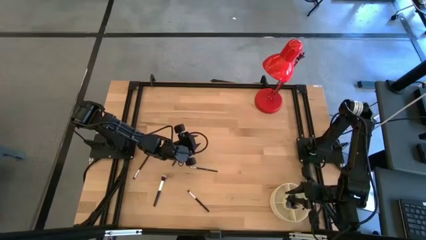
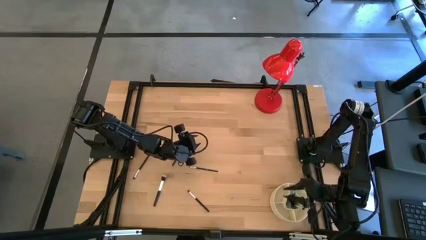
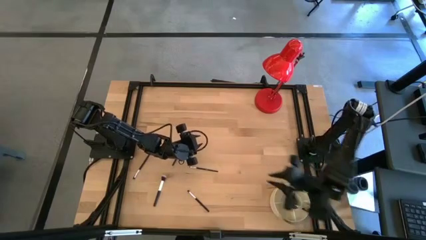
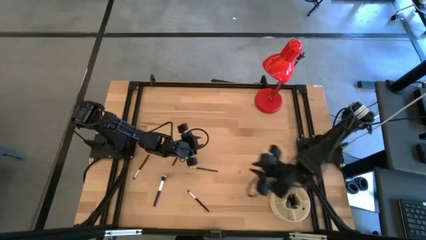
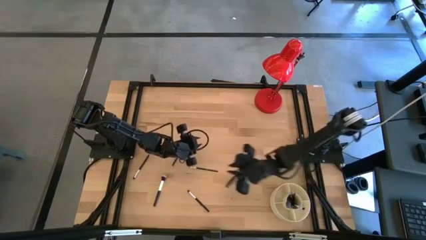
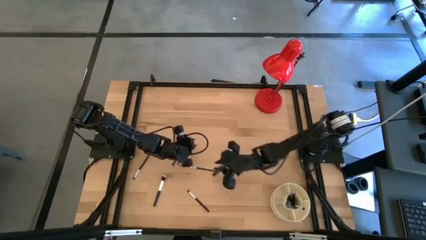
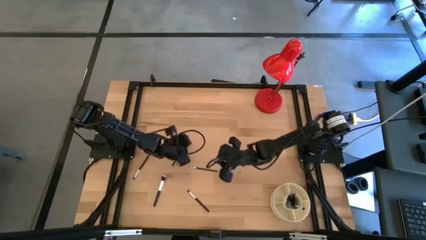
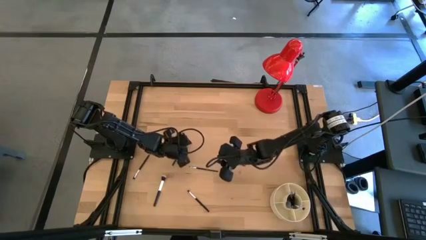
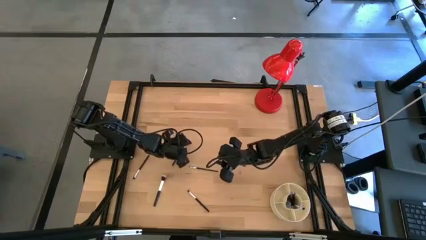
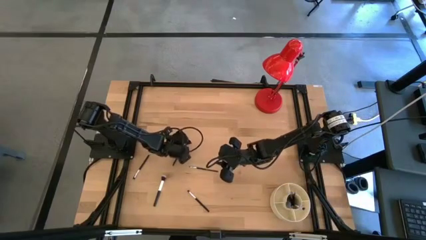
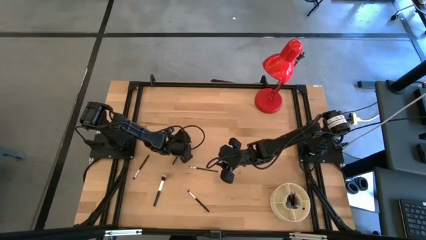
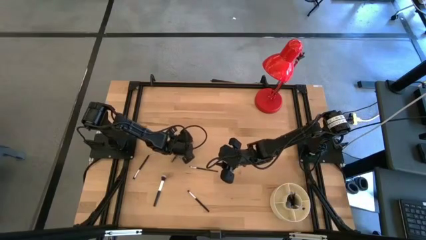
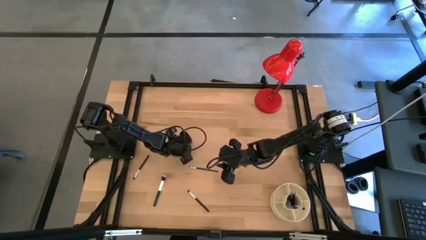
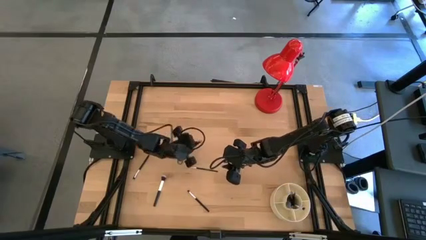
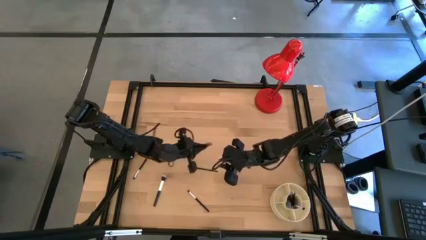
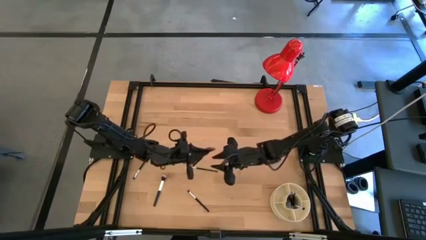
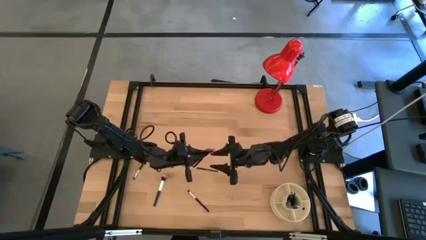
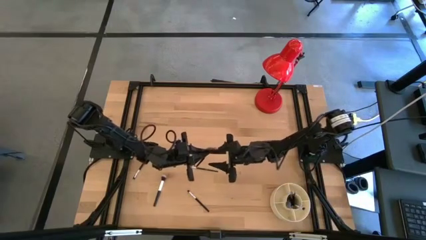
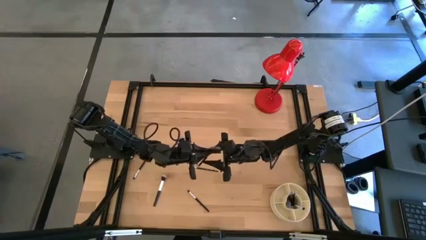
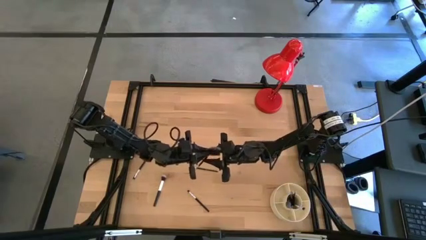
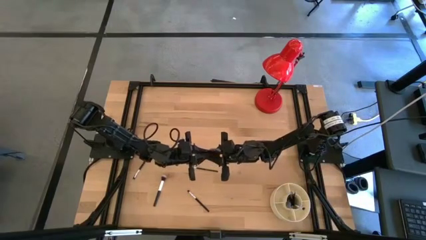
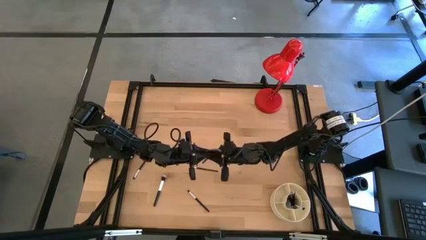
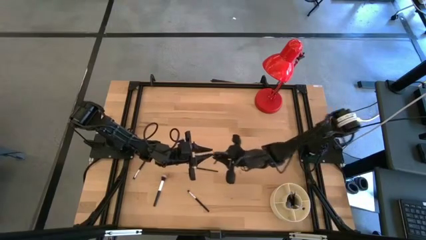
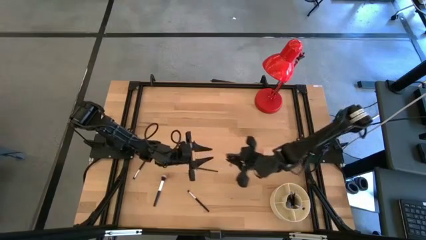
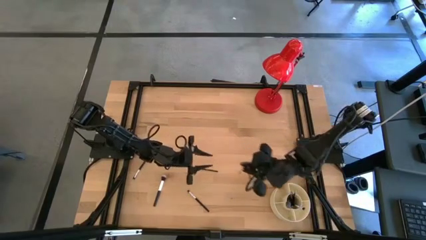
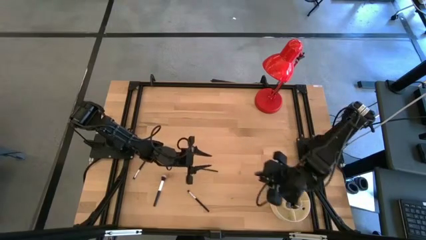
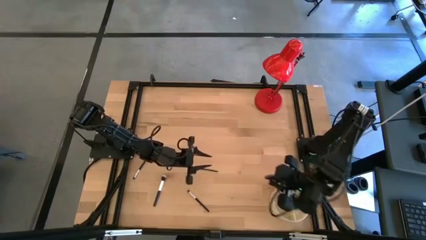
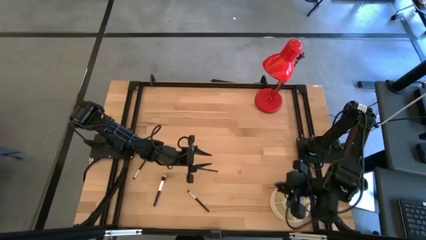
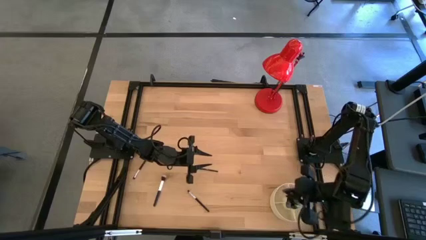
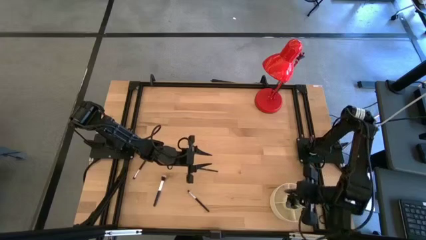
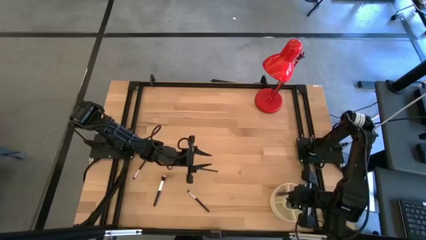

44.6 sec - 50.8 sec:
Task: Put items in baskets/containers
Put the black highlighter brush into the yellow pen organizer

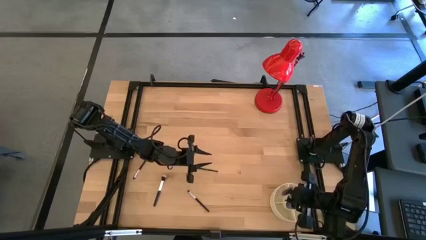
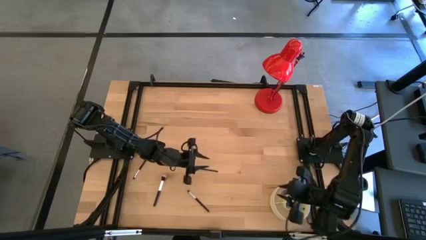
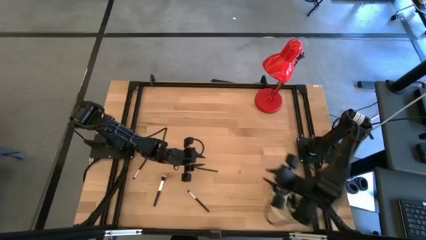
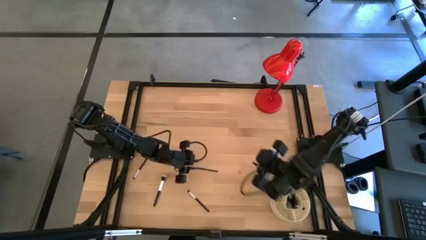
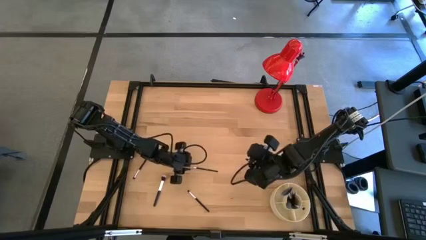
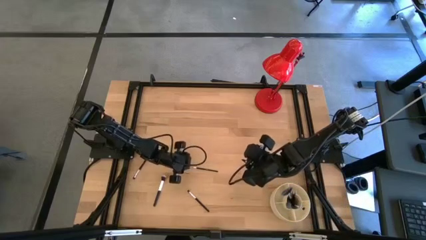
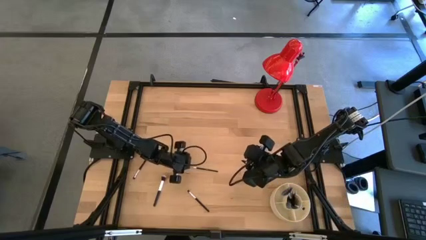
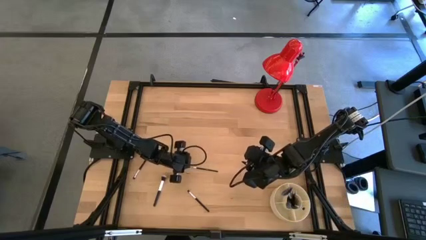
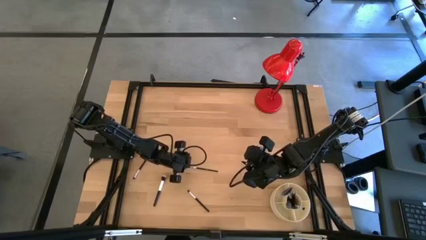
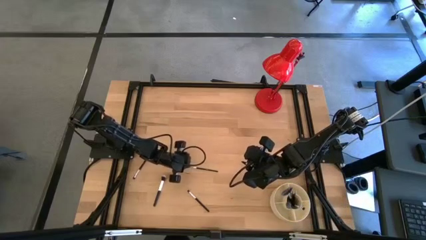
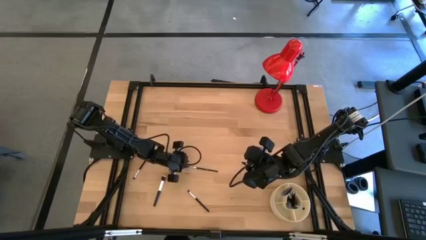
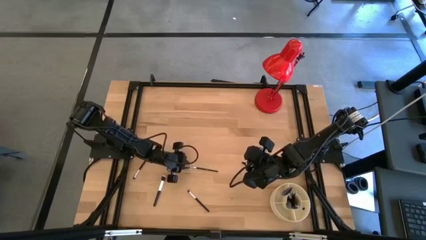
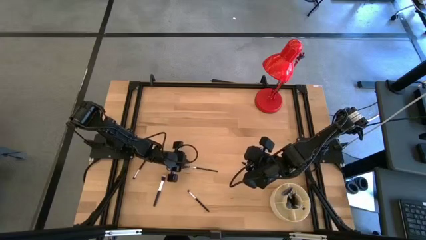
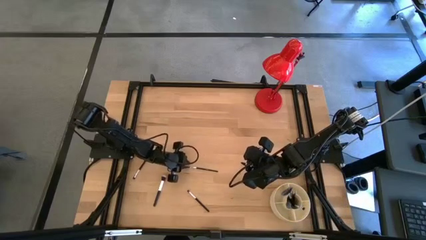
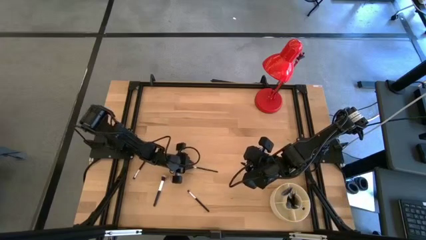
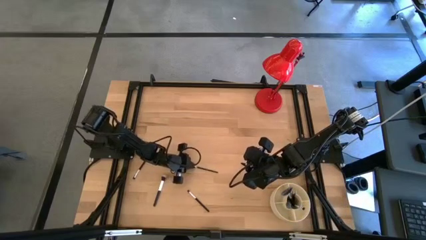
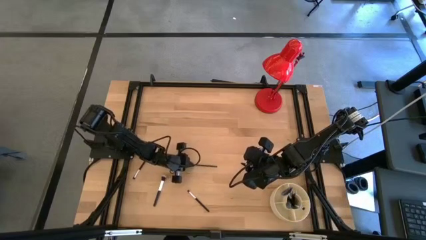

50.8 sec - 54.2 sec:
Put the black eyeshadow brush into the yellow pen organizer

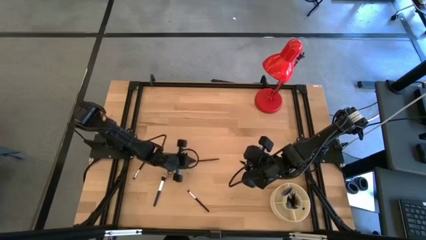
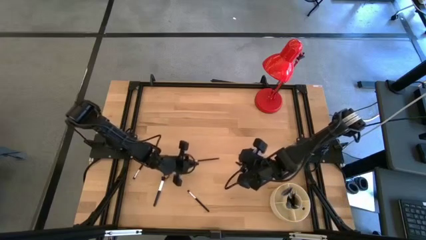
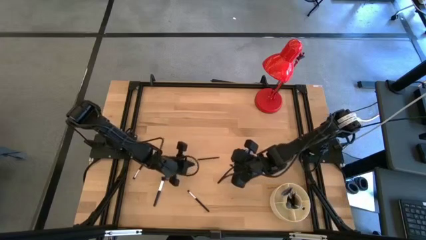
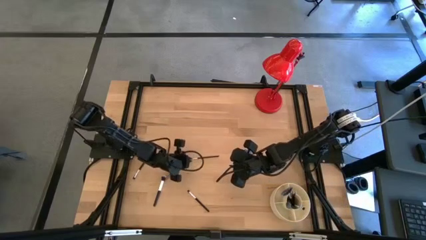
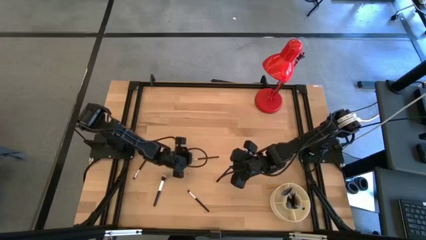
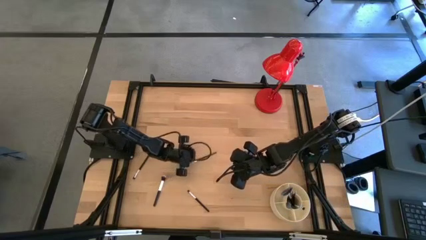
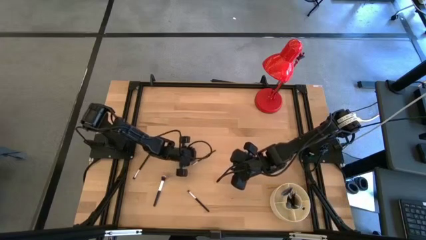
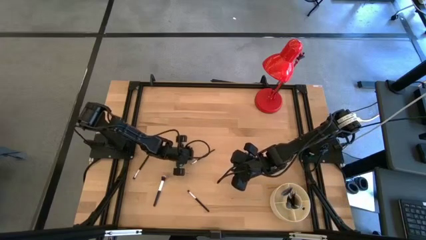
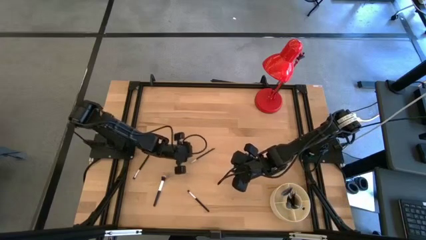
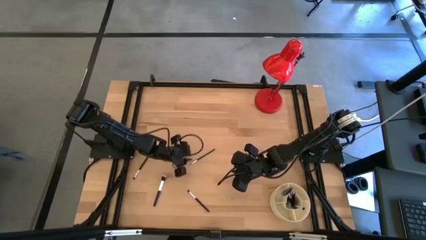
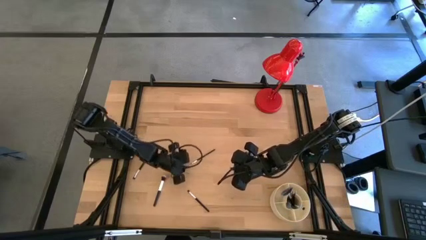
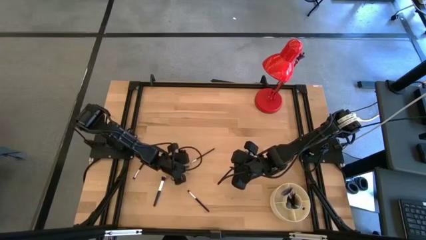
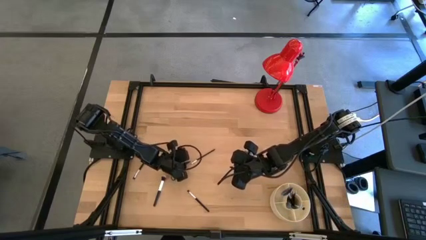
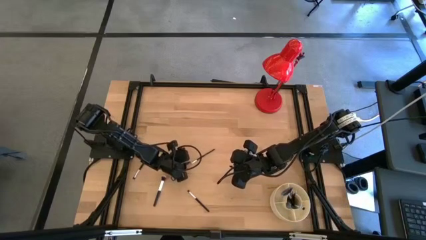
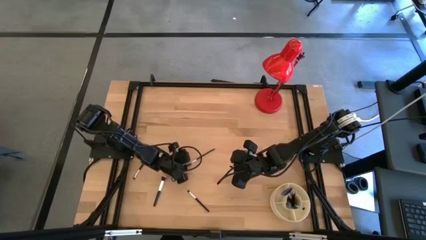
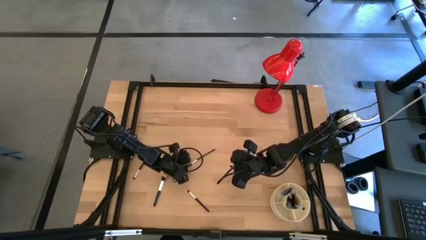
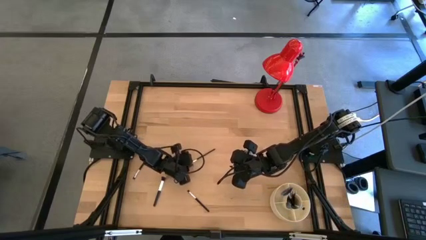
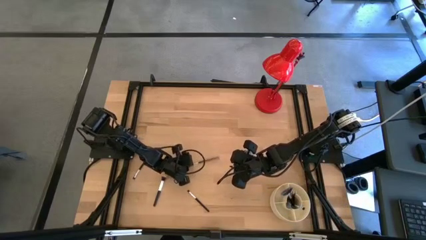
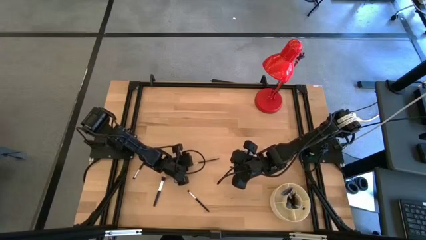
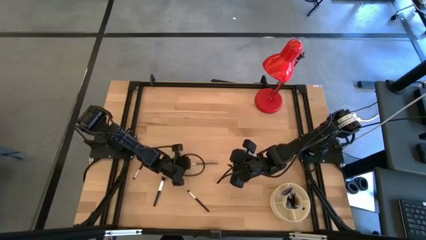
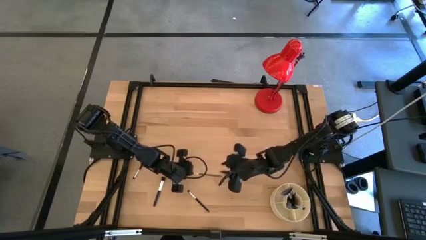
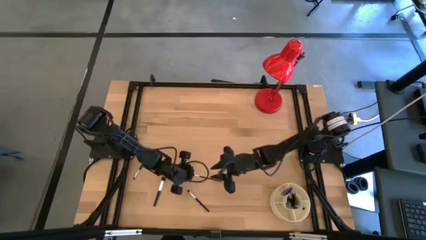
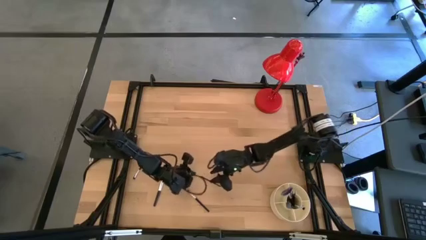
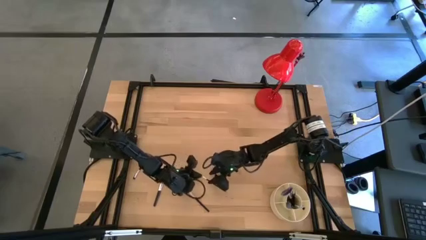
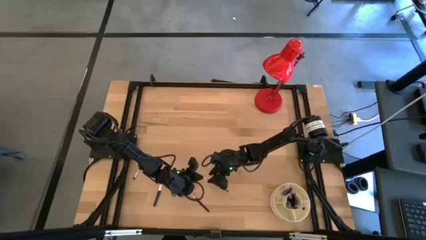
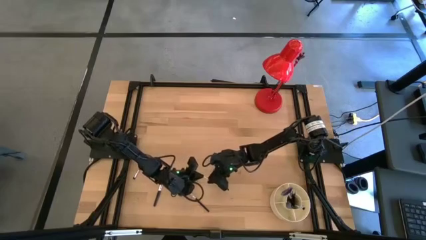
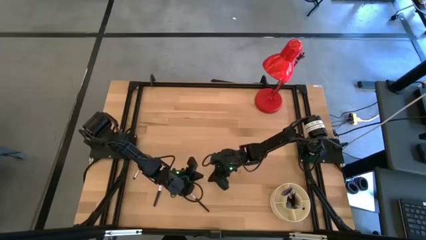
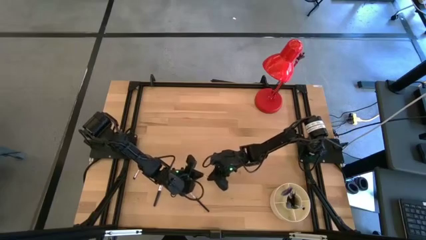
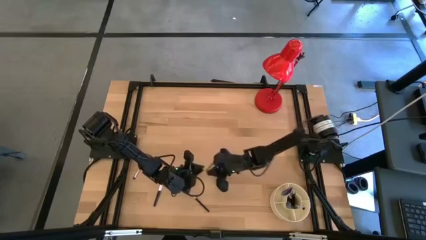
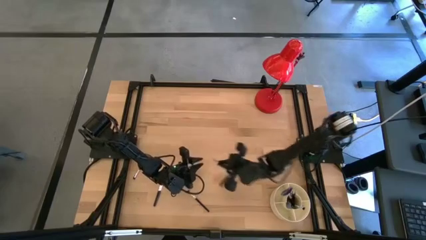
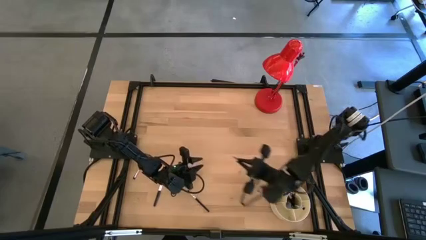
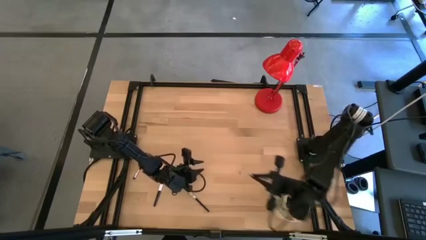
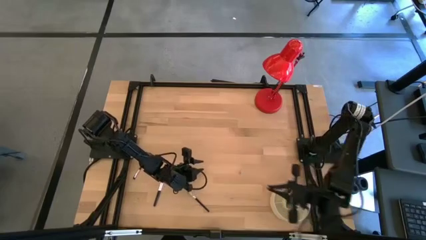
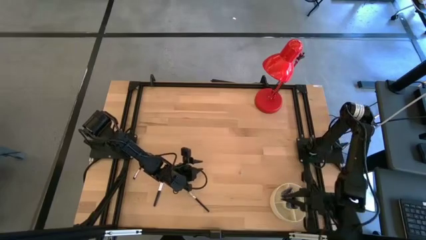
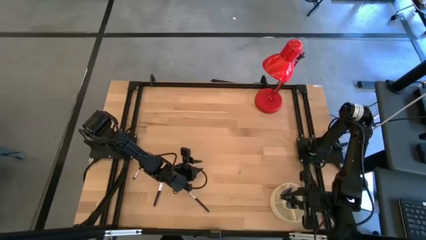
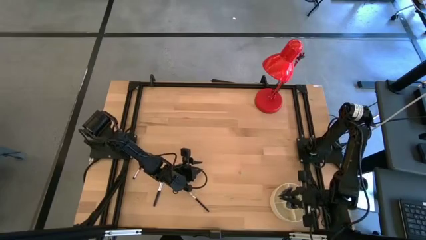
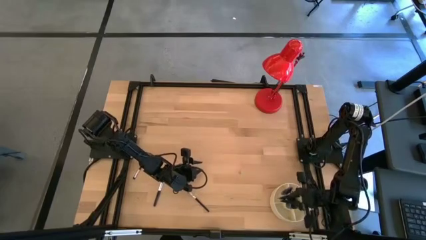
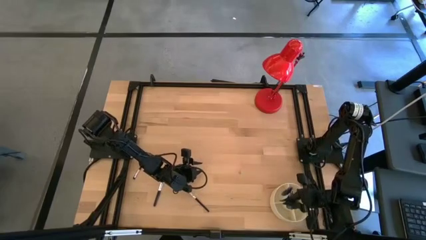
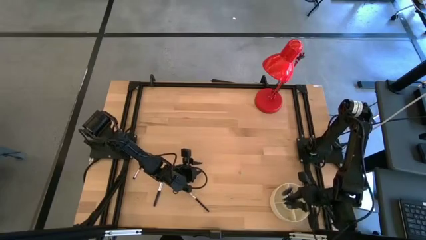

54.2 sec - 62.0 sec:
Put the black eyeshadow brush into the yellow pen organizer
